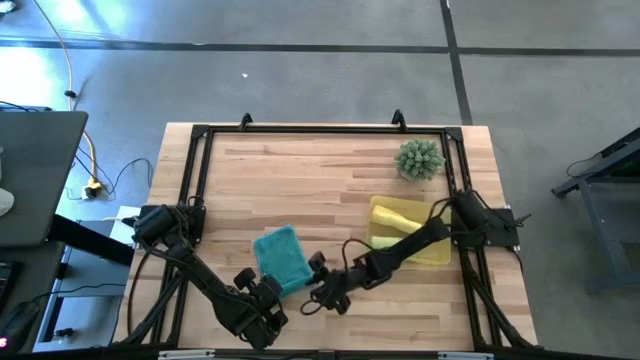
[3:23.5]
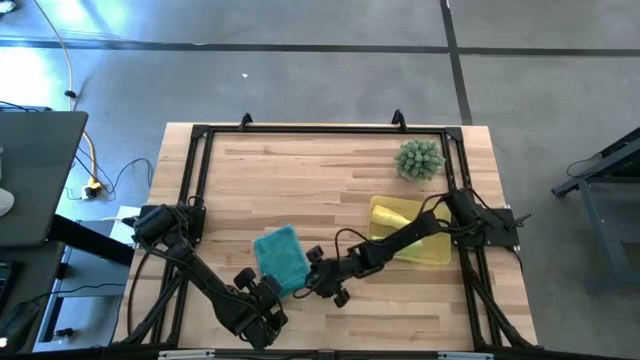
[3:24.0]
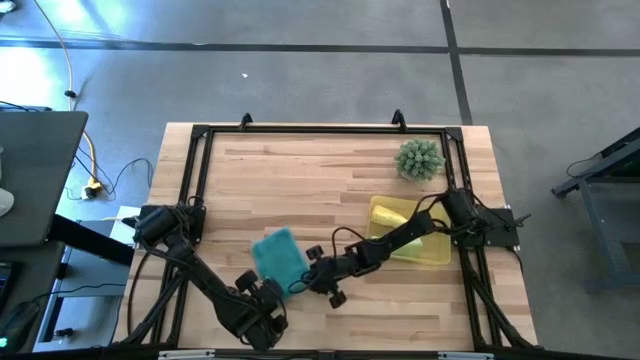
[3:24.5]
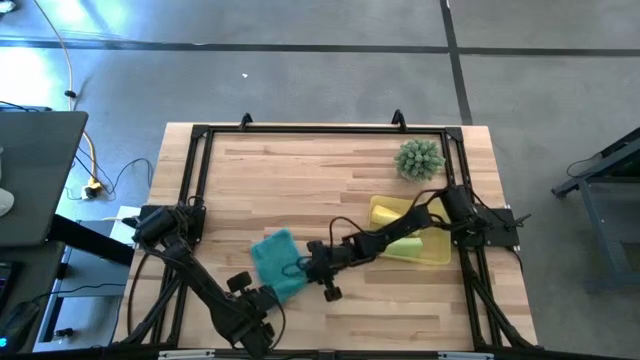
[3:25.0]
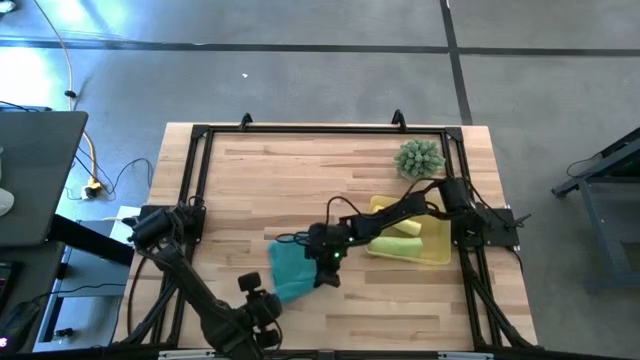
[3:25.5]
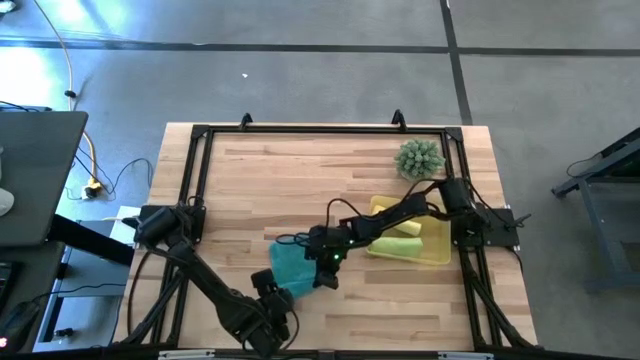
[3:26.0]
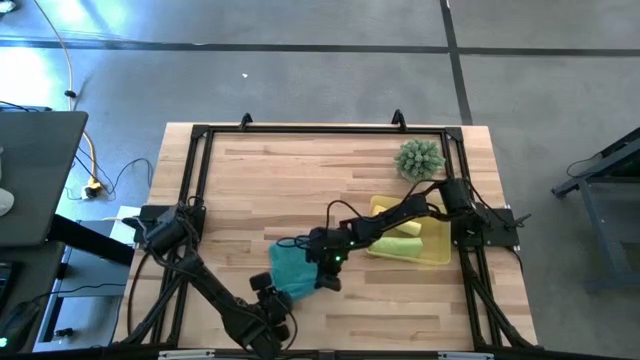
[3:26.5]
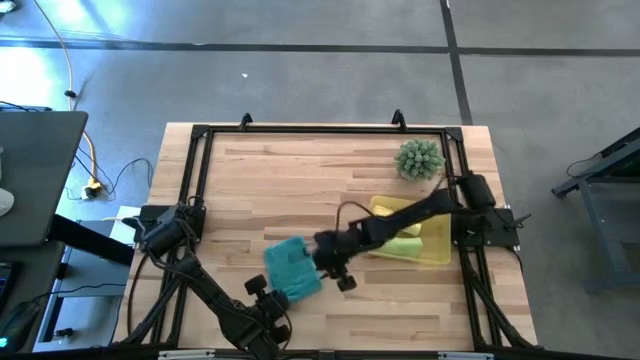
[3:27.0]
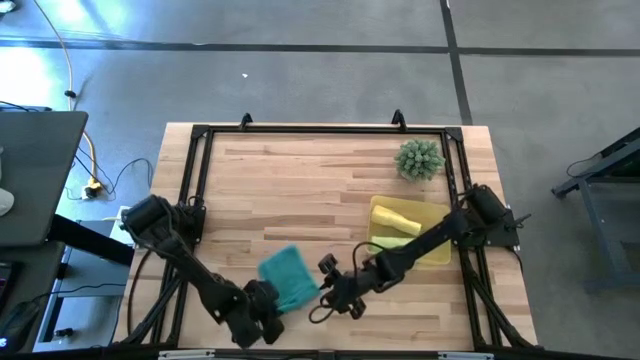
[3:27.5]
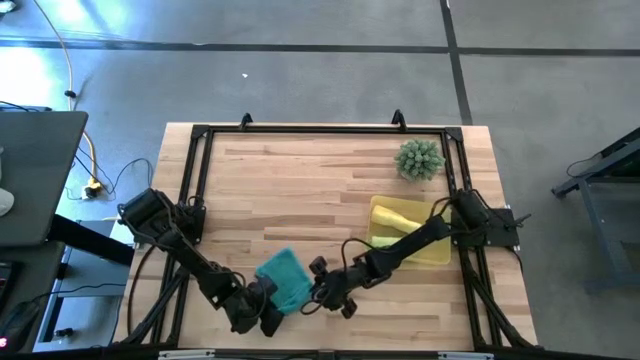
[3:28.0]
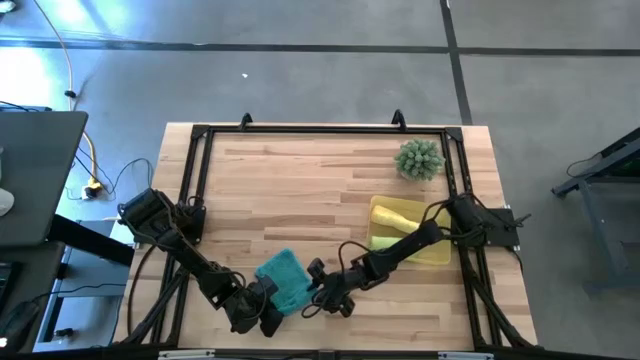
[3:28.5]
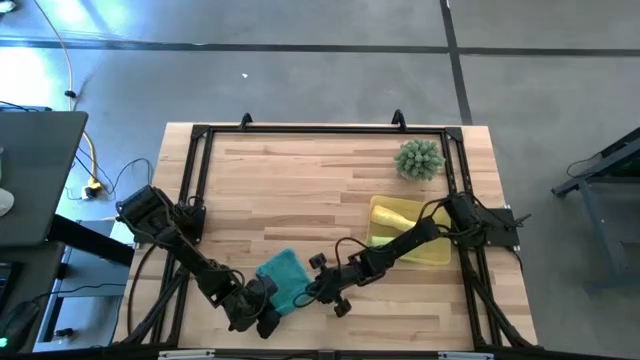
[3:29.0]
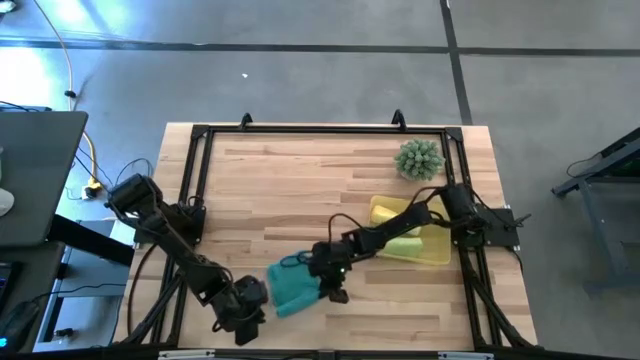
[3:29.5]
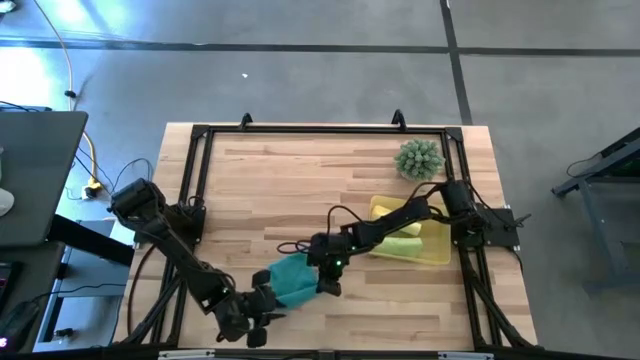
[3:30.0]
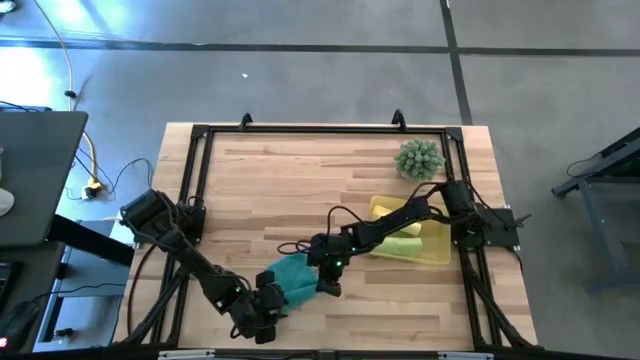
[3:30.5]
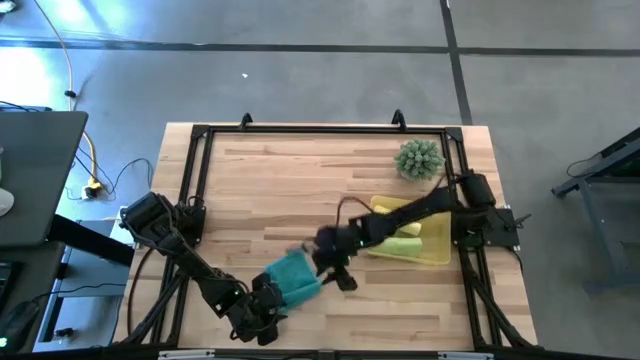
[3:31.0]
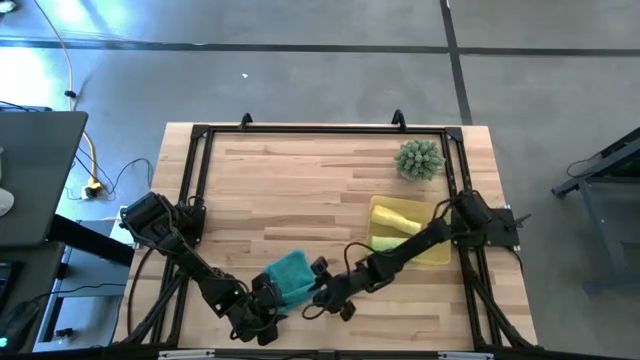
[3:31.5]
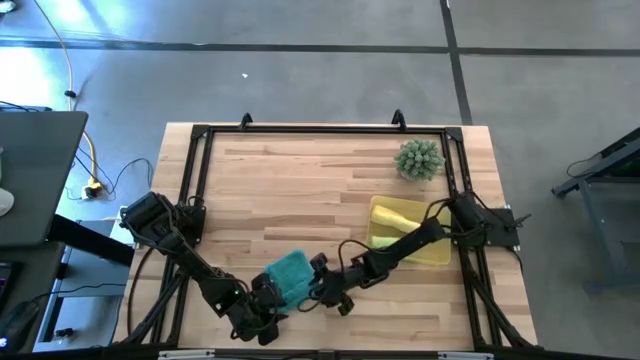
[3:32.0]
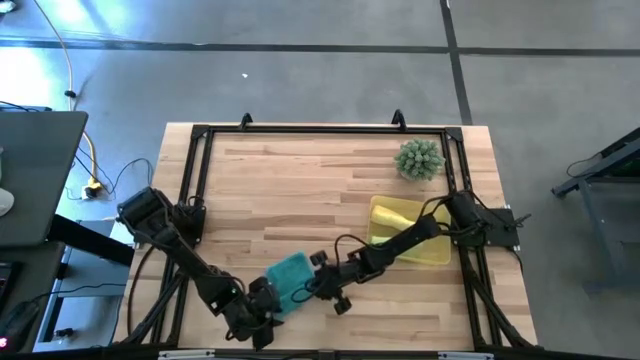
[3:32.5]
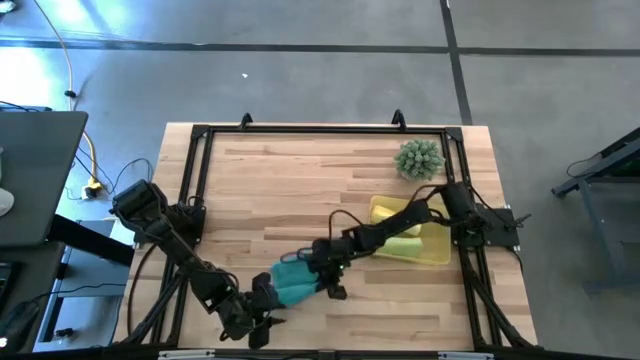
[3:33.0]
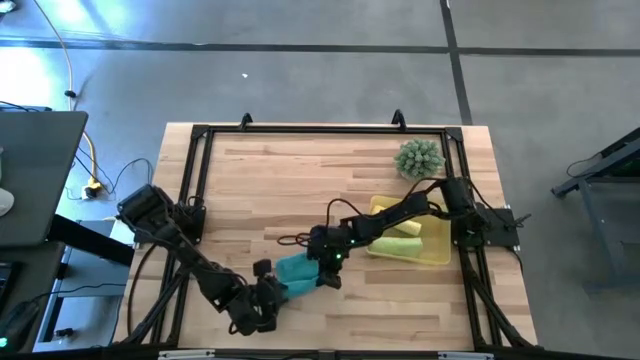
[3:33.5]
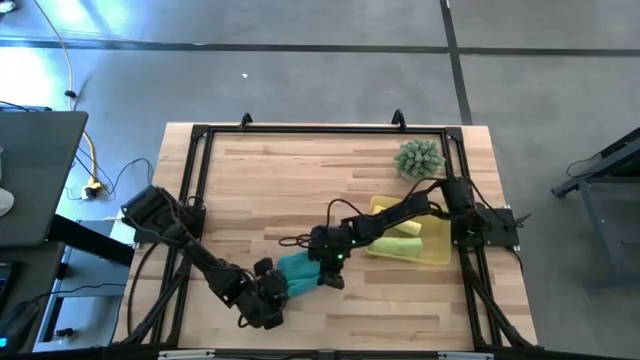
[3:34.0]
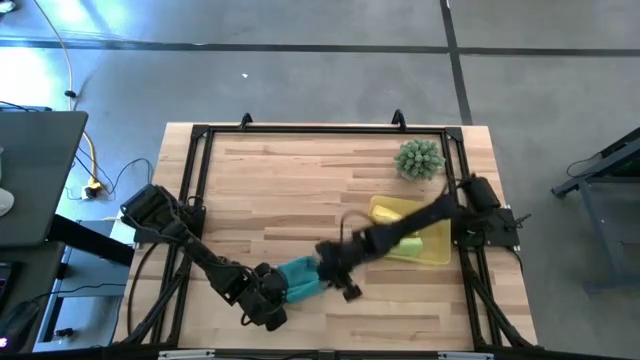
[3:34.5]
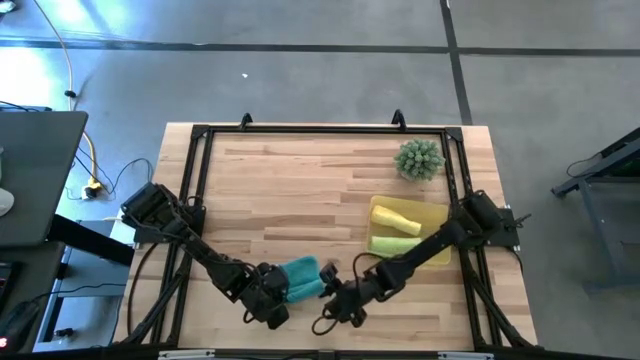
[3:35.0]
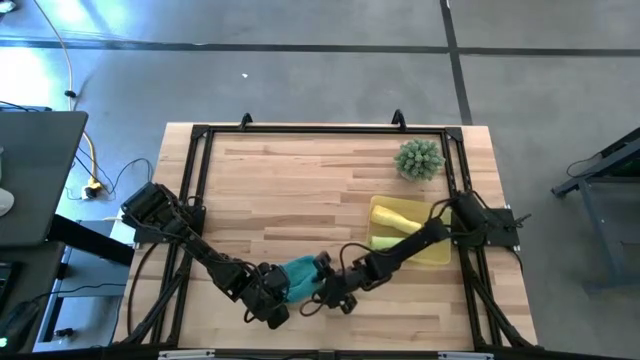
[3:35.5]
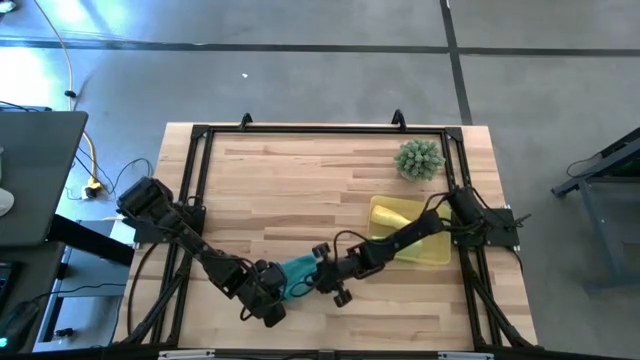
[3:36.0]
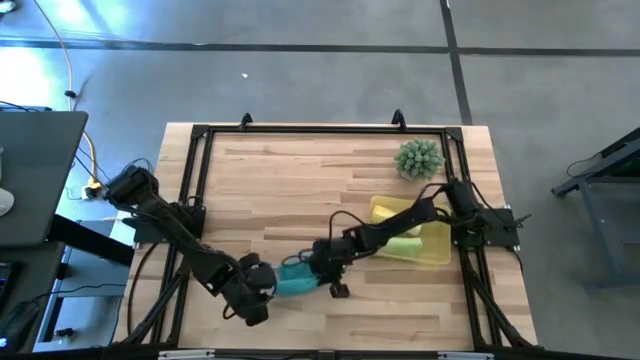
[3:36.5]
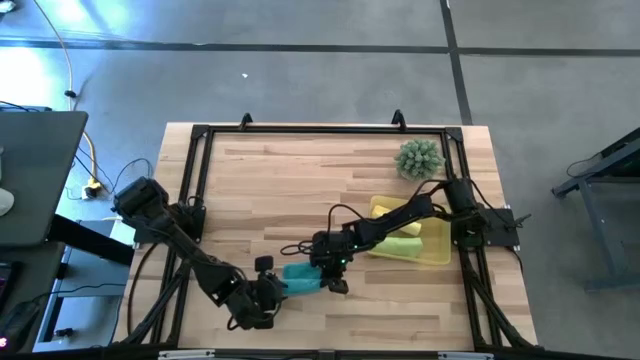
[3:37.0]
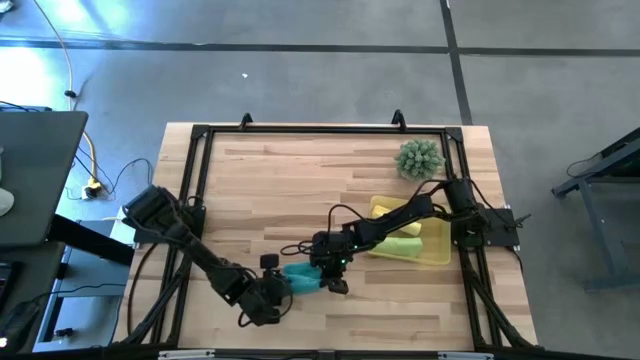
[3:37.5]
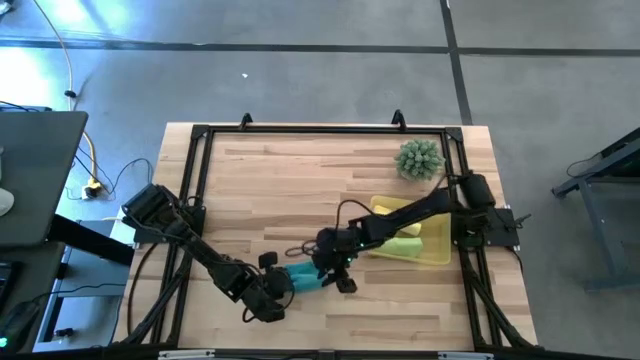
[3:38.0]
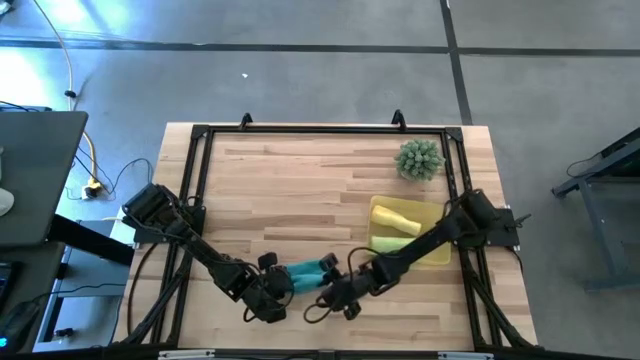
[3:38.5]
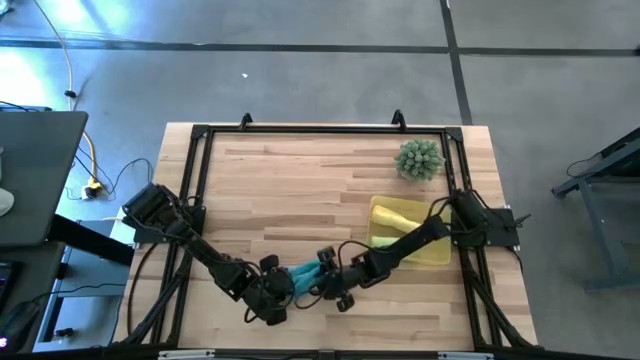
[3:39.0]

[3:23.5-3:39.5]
Task: Roll microfiber towels into tight, uniform cylinder then place into a basket
Roll the blue microfiber towel

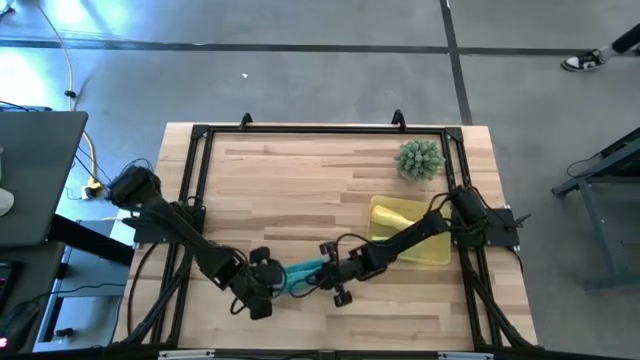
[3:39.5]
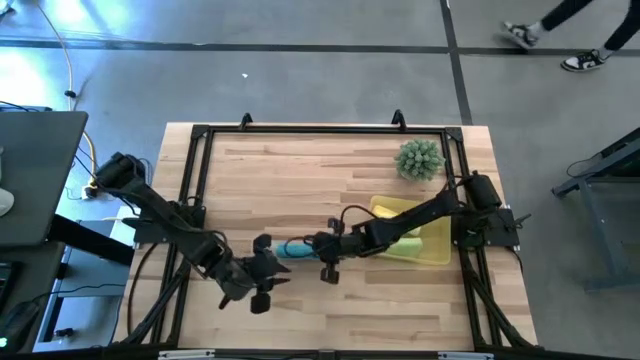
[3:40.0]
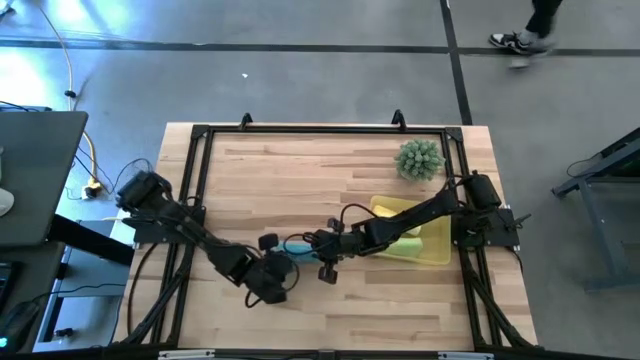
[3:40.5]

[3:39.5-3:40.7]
Roll the blue microfiber towel

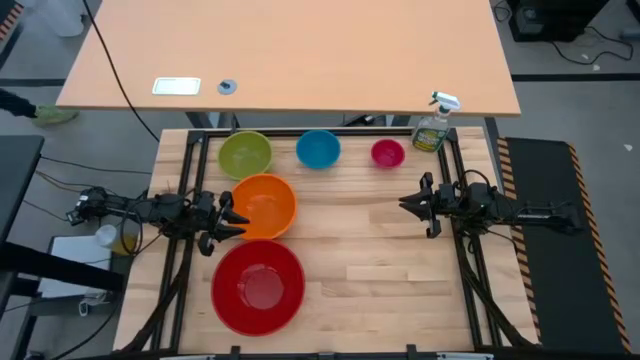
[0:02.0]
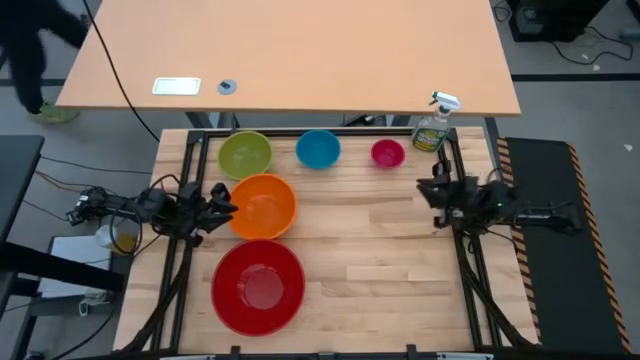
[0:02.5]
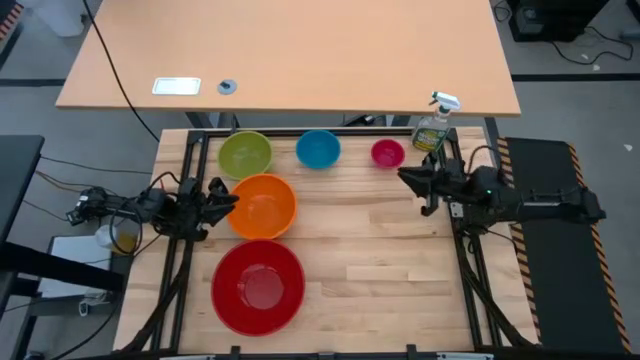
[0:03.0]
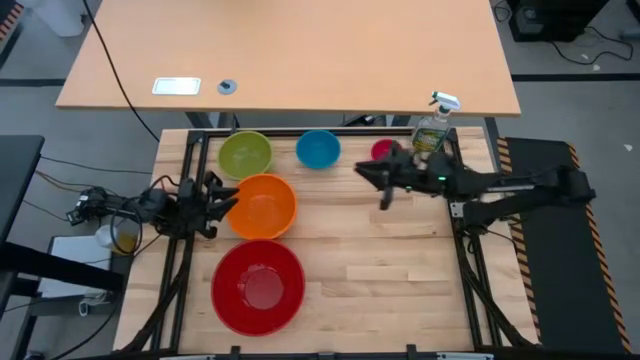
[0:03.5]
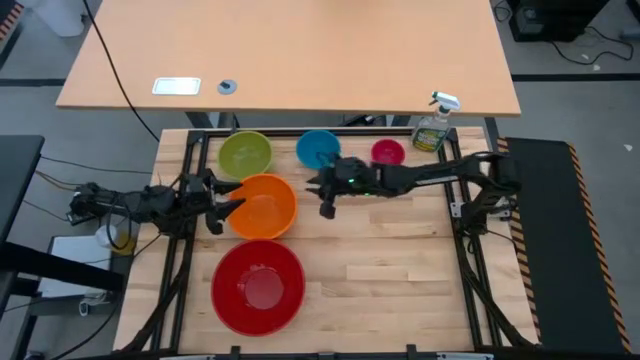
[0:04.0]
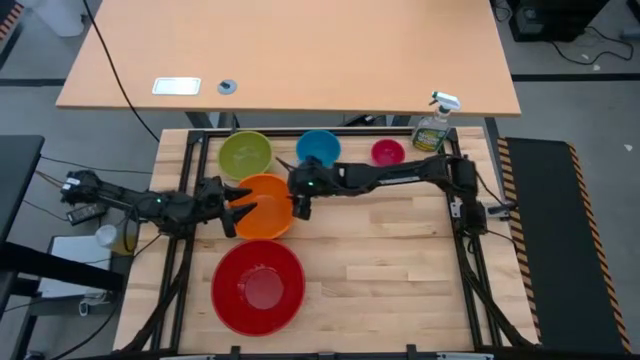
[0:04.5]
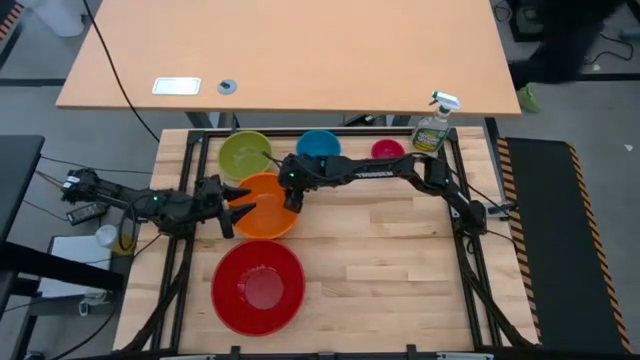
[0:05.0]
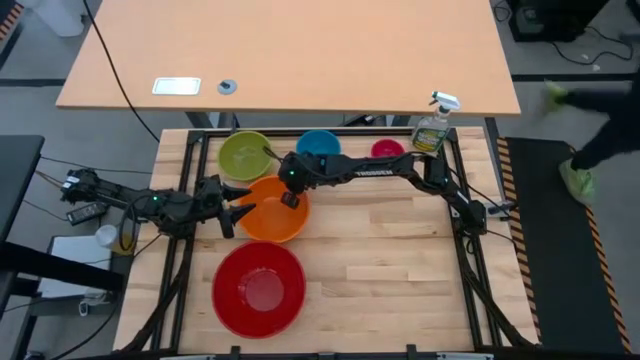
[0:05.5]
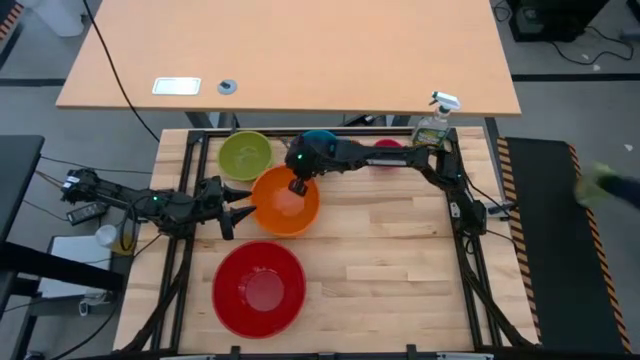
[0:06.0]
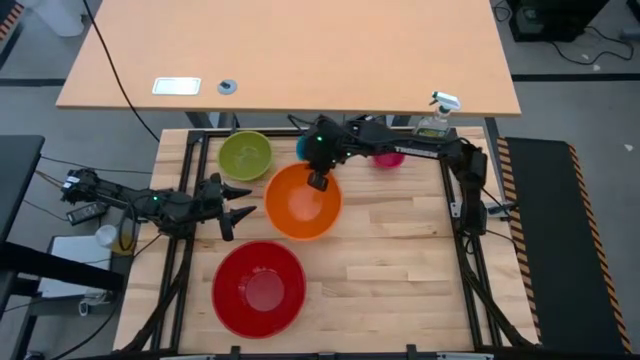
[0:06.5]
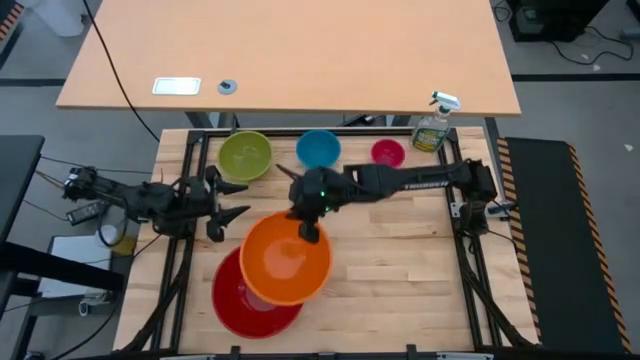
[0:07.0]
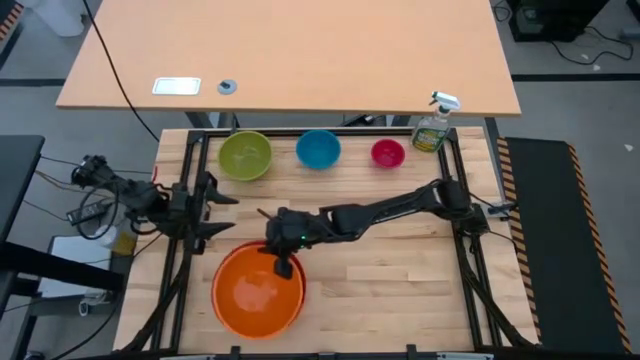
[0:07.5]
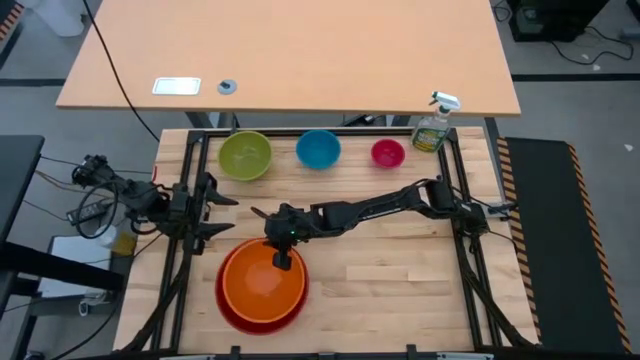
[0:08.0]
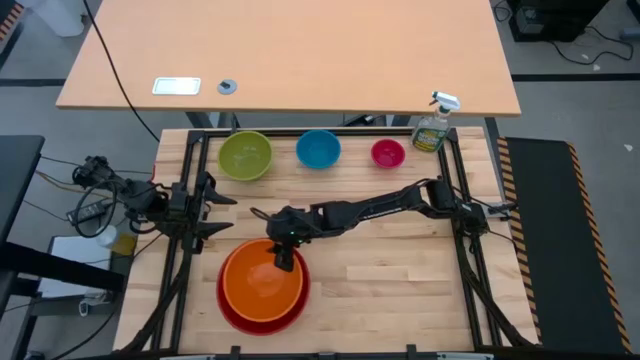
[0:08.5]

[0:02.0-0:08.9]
Task: Nest bowls inside each other by size order
Stack the orange bowl on top of the red bowl
